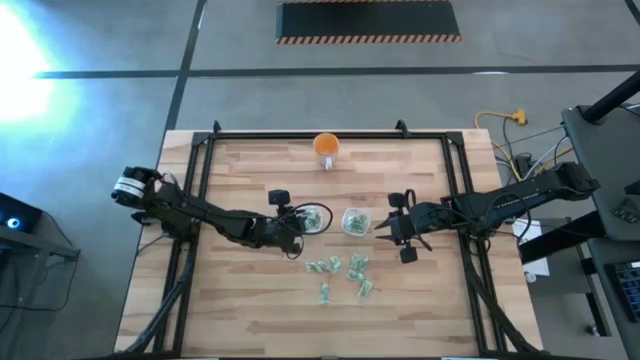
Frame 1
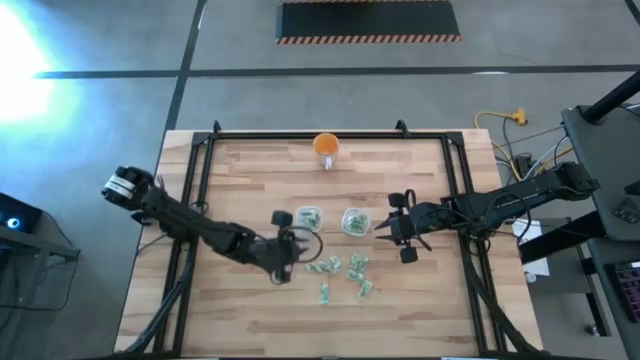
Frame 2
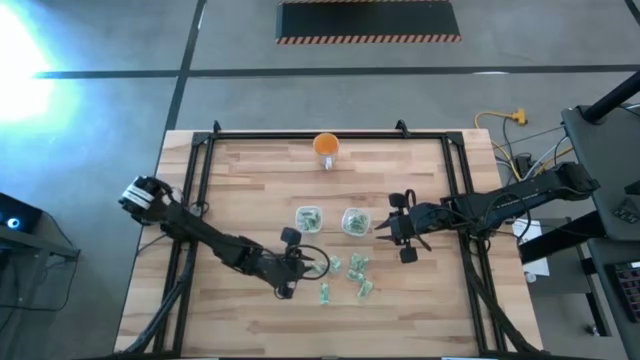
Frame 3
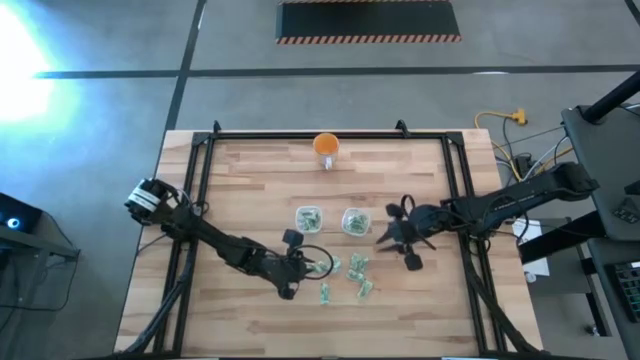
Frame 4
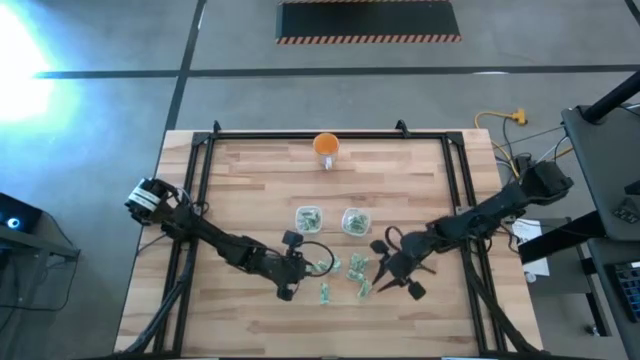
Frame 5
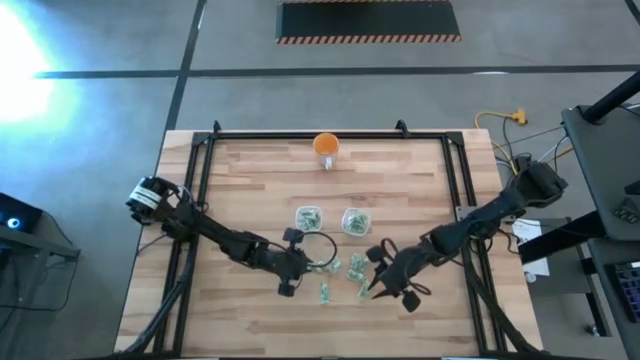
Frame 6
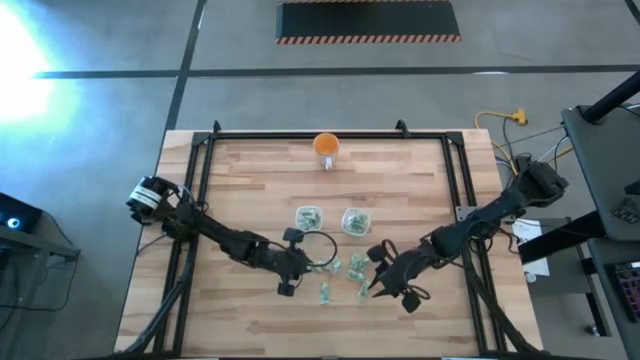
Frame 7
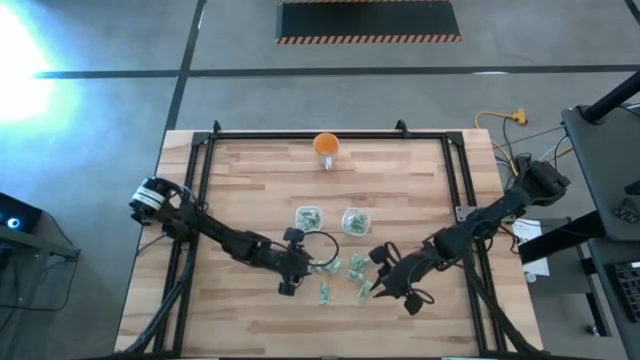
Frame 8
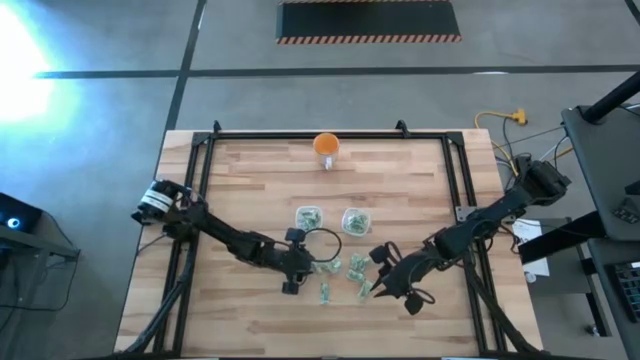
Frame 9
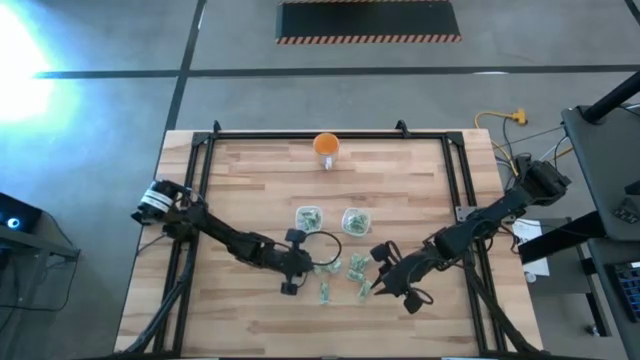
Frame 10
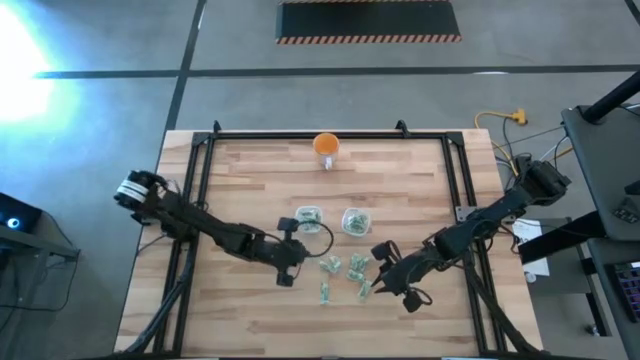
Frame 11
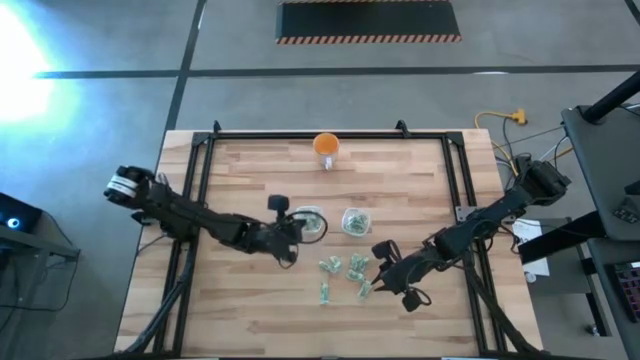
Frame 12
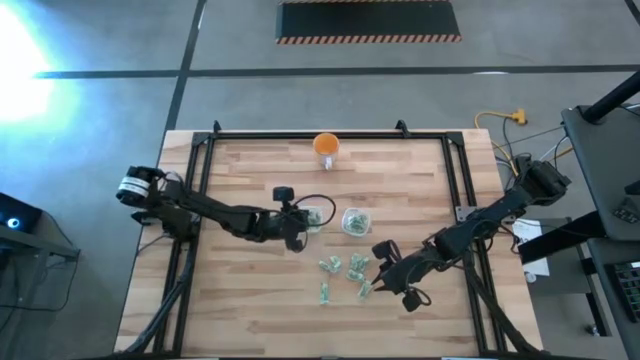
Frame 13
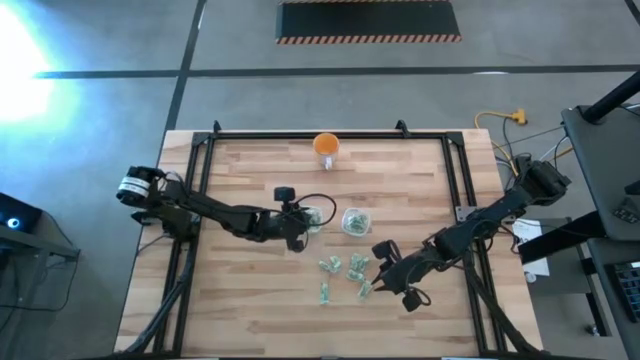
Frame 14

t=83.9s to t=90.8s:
Task: Pick and place Stevia / Truvia into bins
Put the green stevia packet into the left transparent container

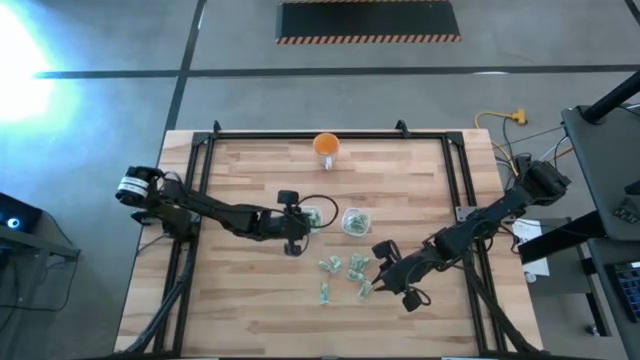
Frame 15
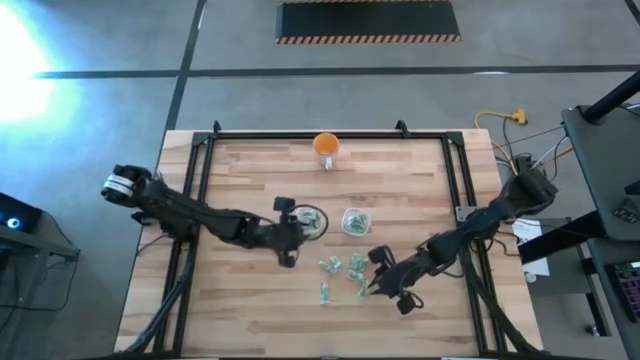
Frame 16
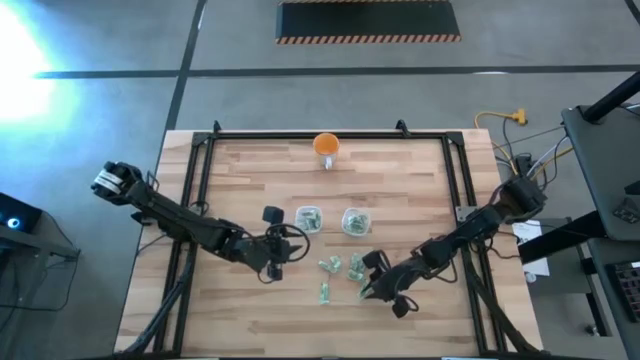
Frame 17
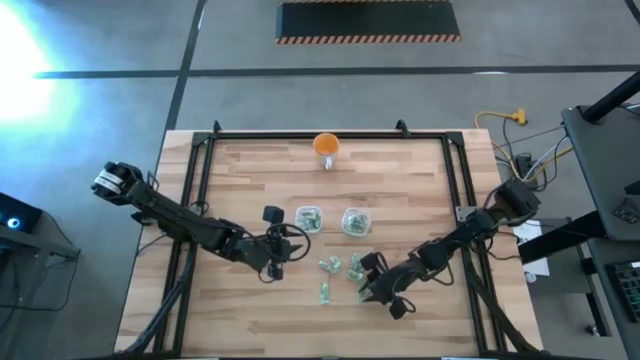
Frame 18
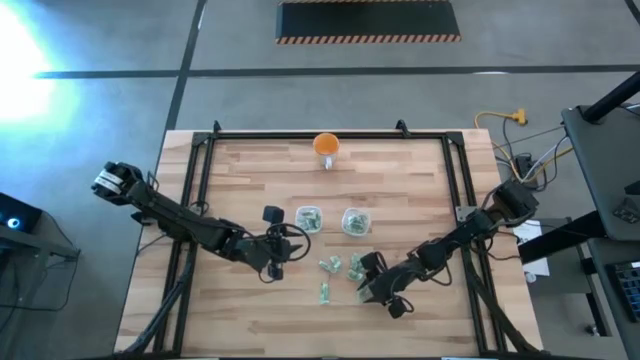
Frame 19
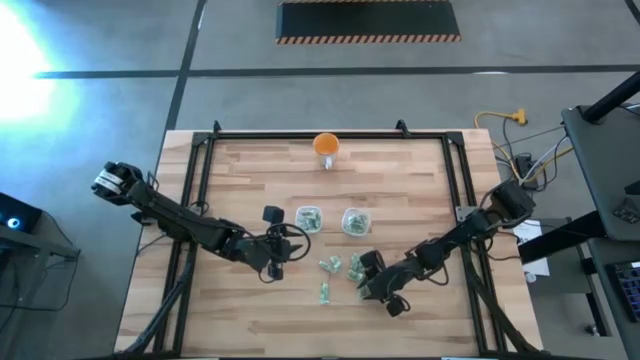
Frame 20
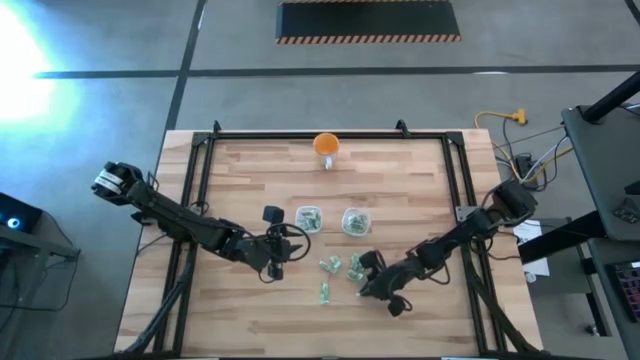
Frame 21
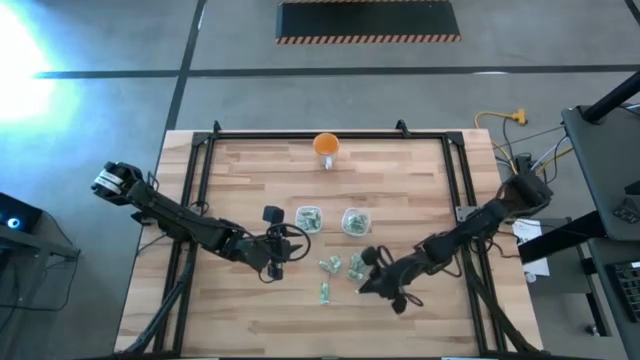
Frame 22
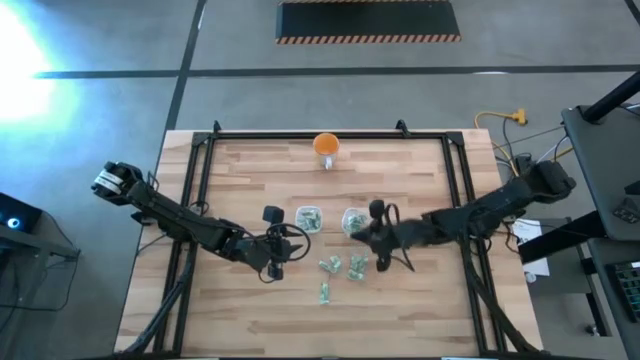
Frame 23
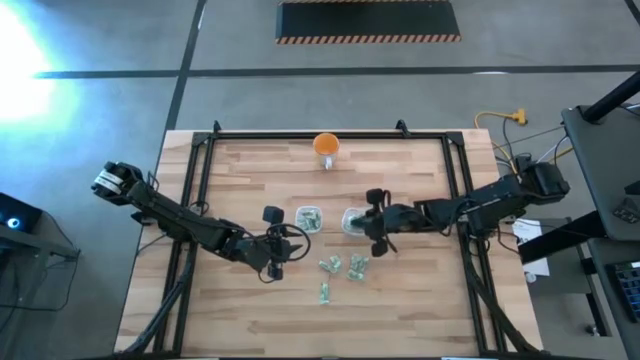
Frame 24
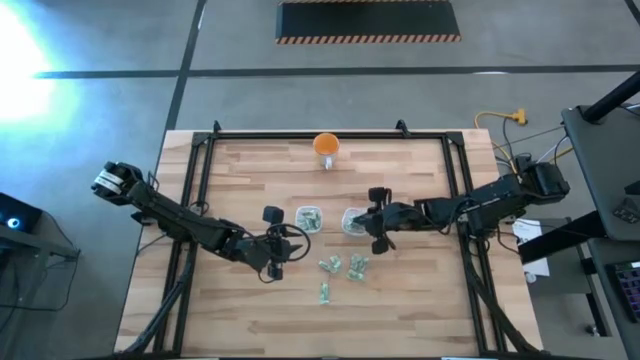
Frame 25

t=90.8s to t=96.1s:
Put the green stevia packet into the right transparent container

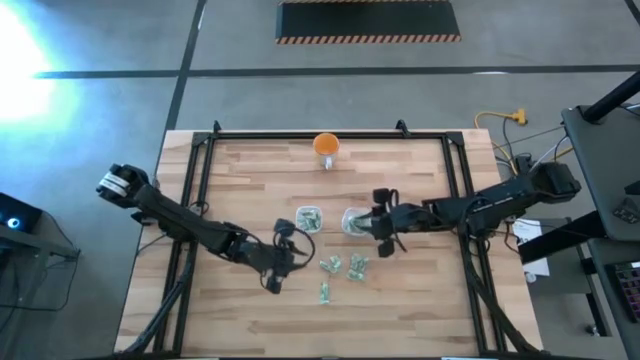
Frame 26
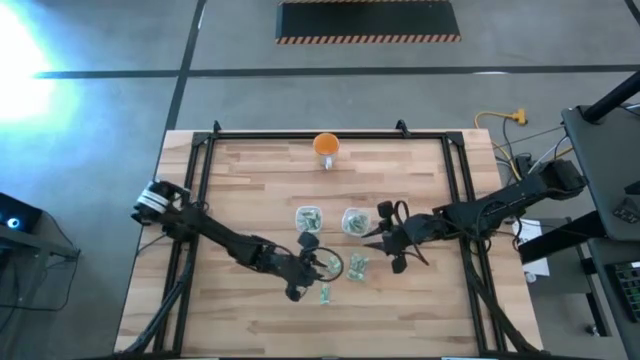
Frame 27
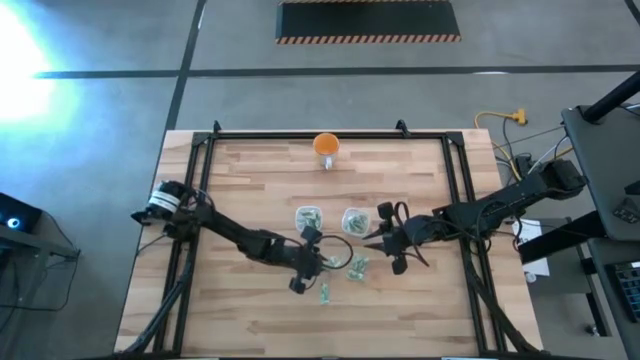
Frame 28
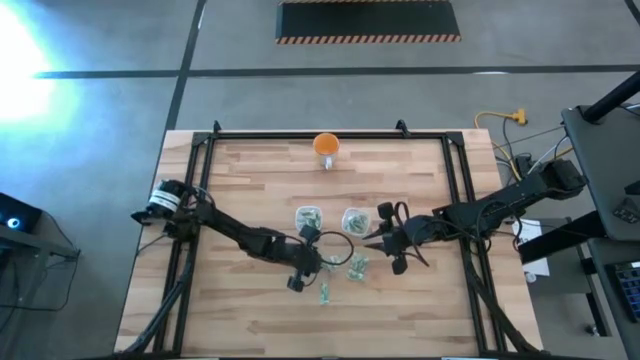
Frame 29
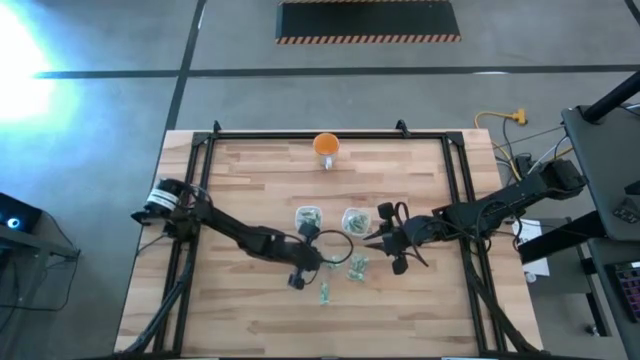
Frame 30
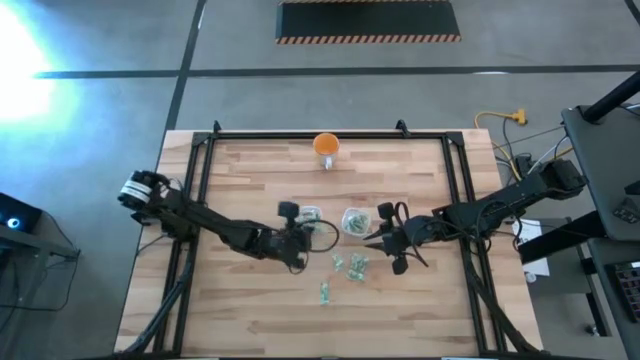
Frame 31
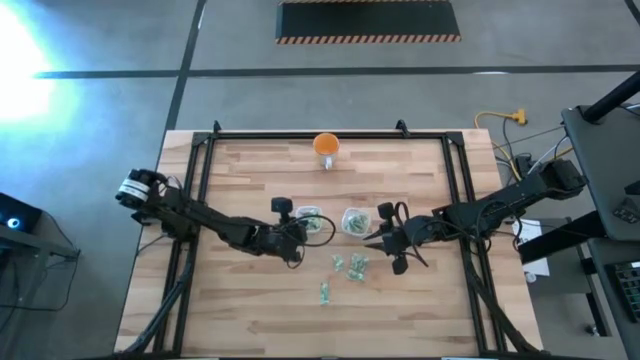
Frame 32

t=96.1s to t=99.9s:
Put the green stevia packet into the left transparent container

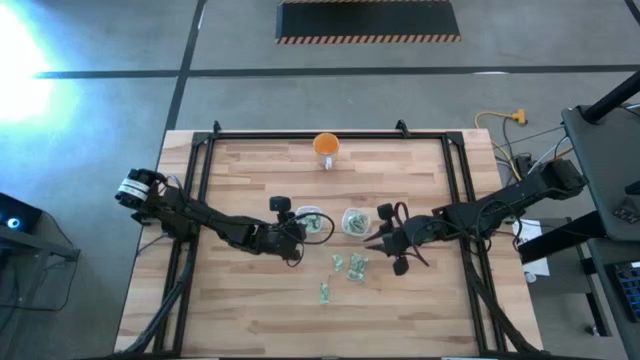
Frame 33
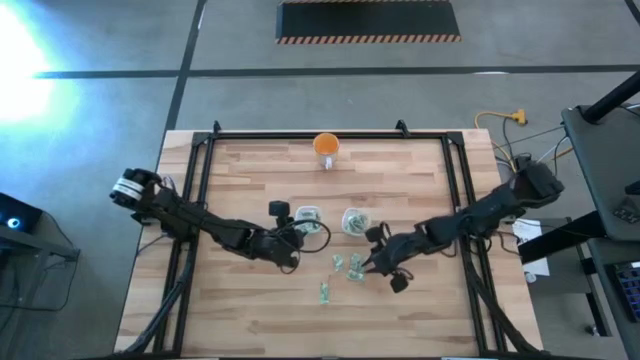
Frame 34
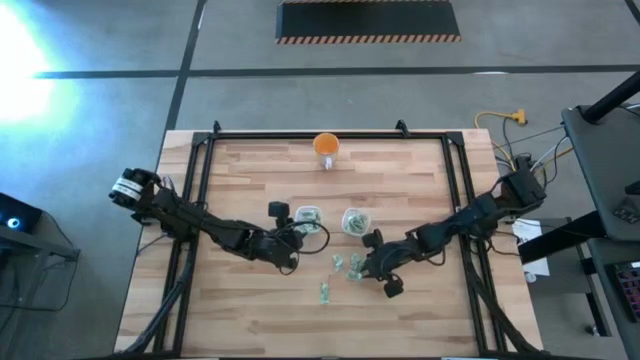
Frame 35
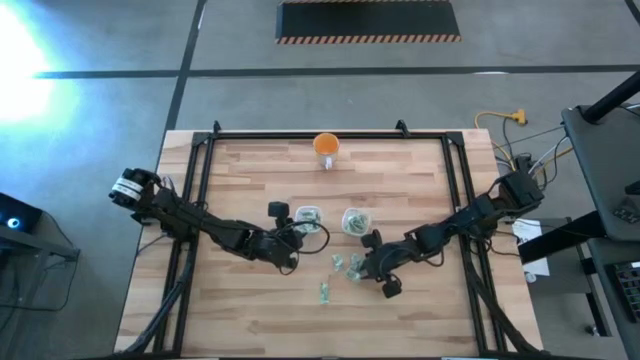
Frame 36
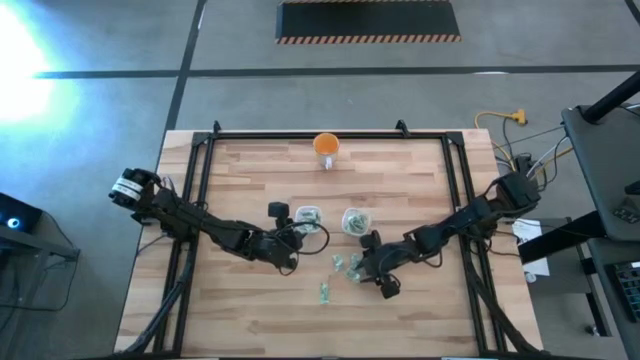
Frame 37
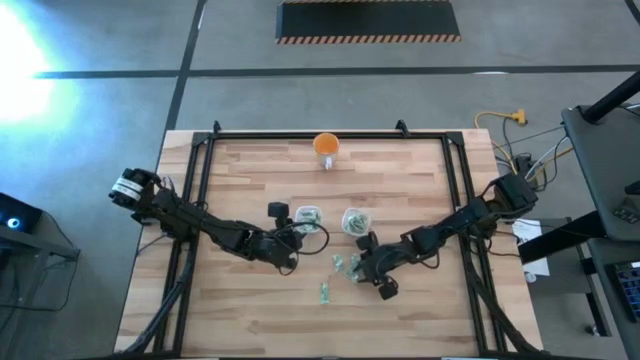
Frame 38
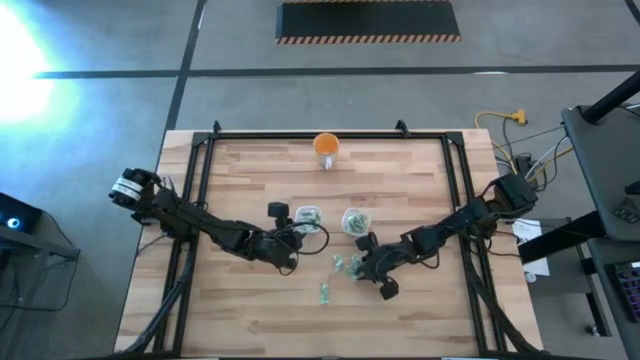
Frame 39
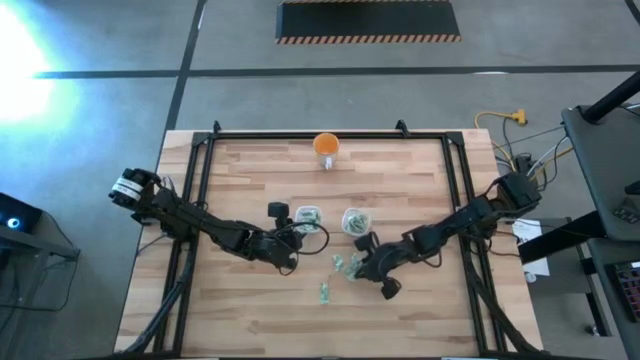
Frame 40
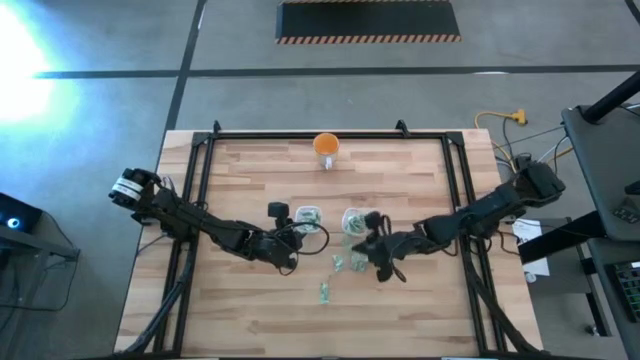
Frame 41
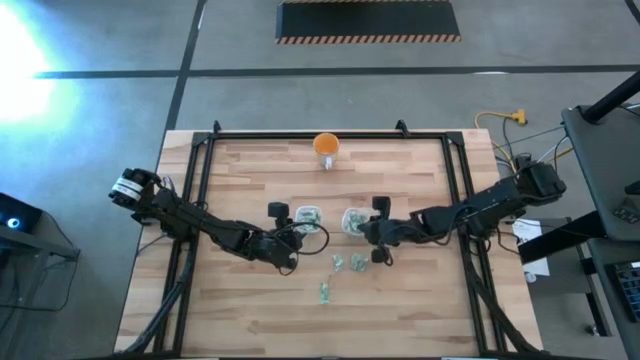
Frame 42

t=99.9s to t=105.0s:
Put the green stevia packet into the right transparent container
